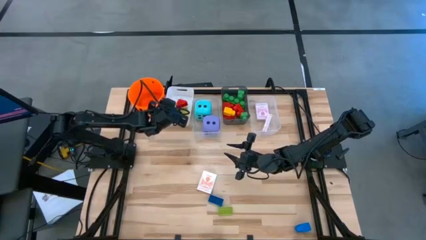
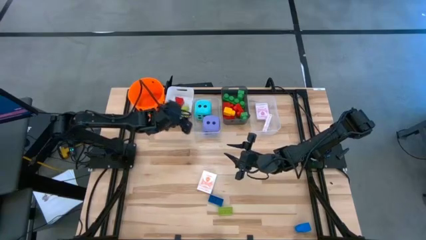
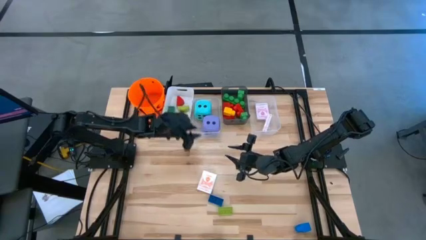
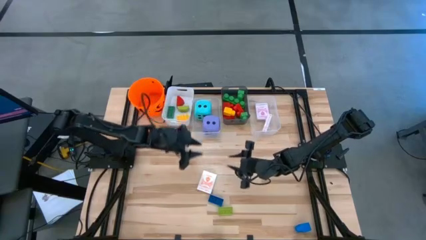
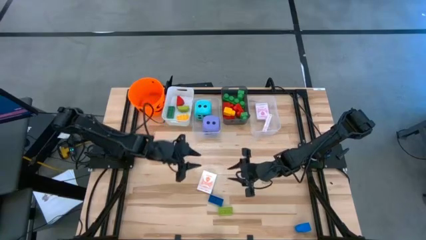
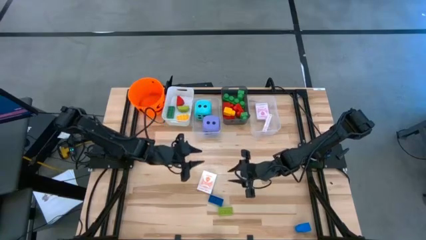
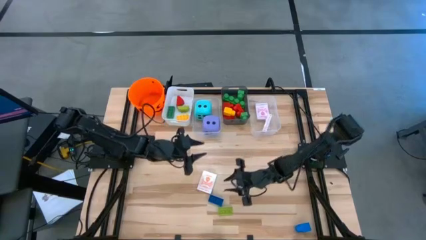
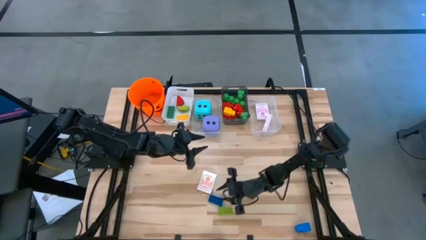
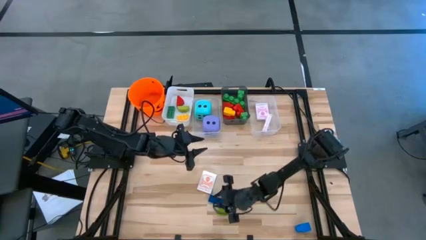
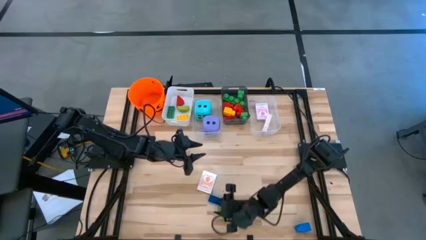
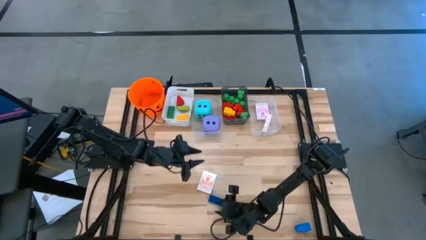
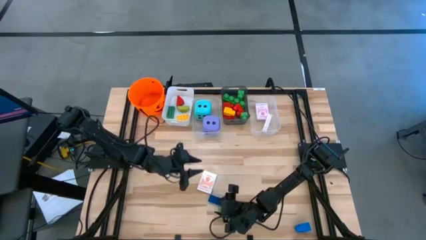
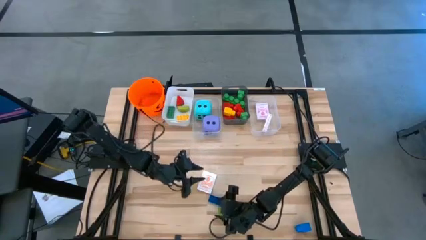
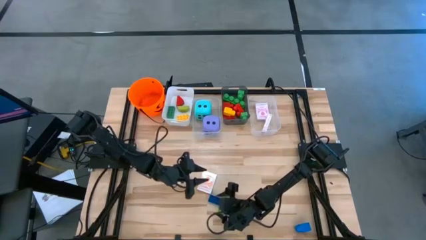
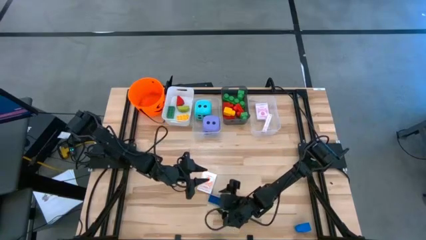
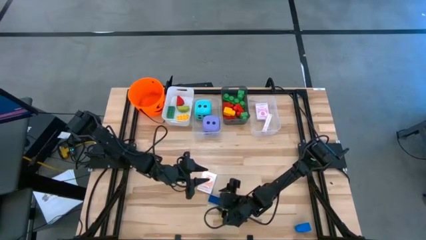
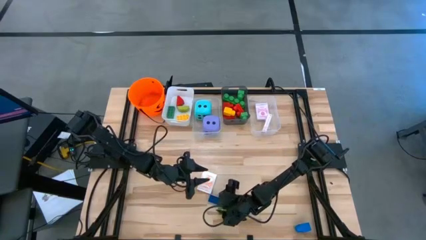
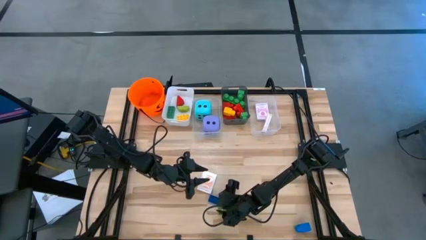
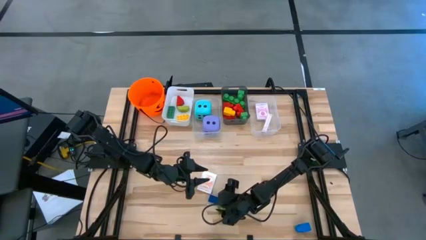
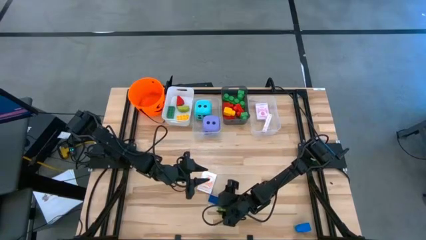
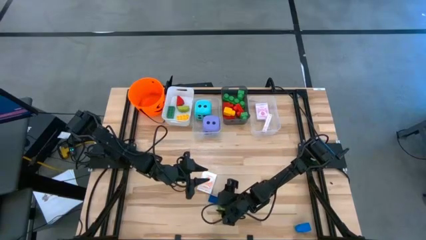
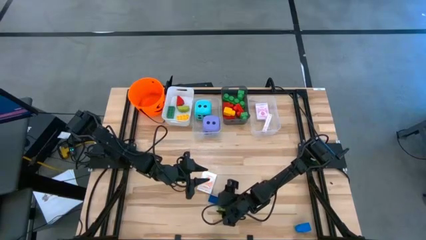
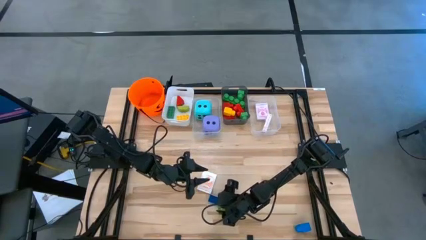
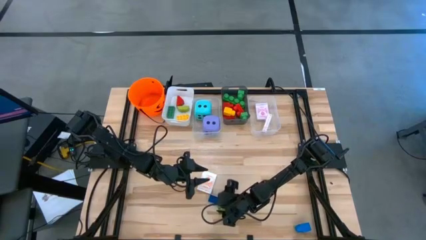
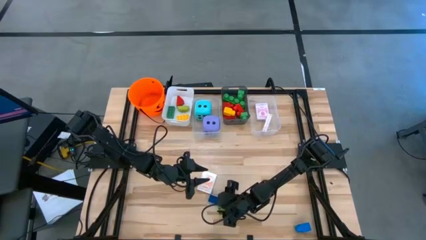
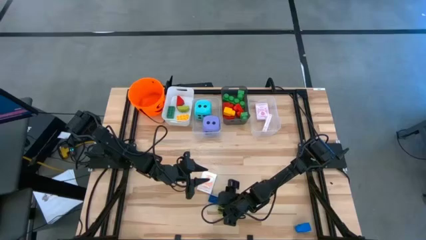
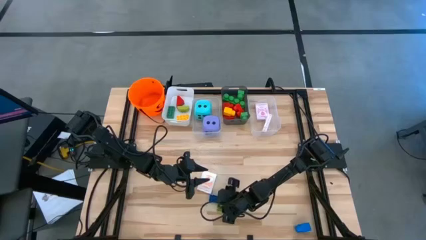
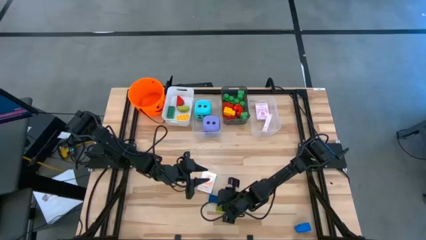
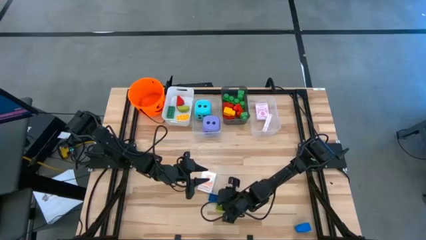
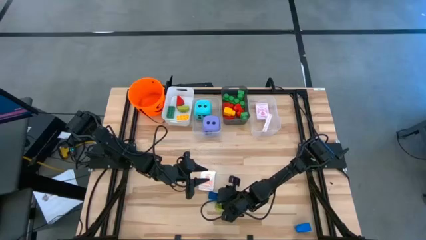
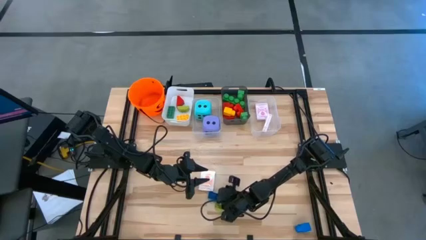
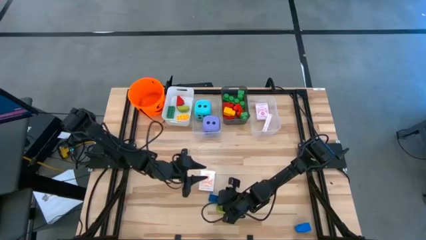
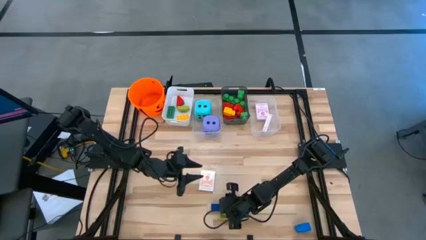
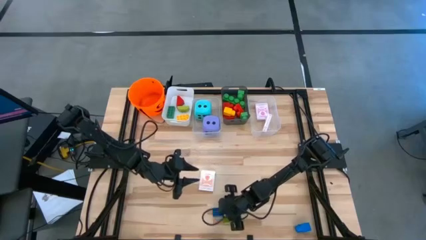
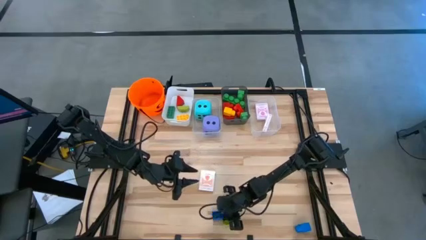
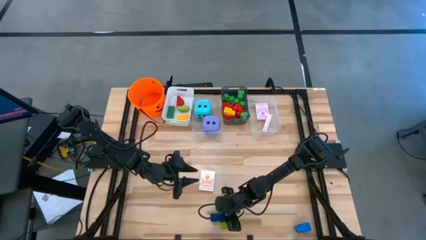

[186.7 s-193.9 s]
Task: Pick & Place Toys
Put the small blue game piece into the white bin

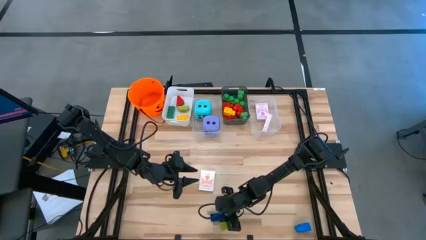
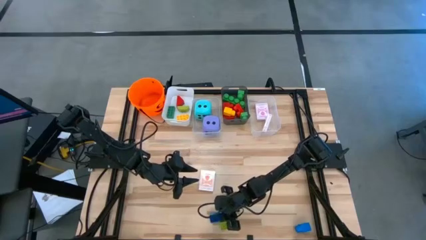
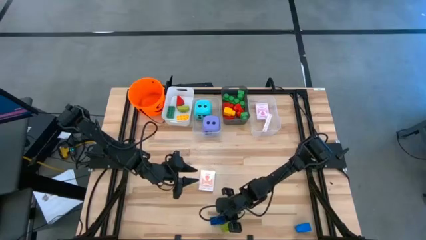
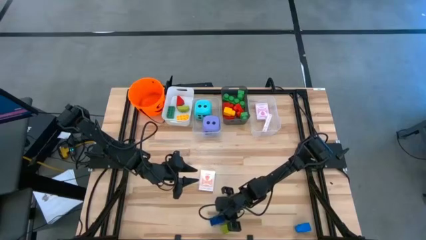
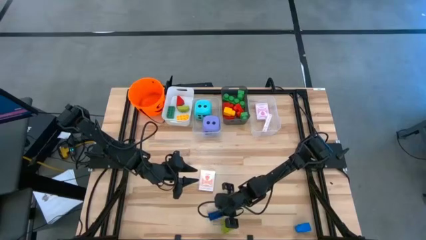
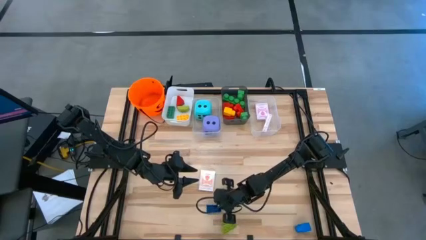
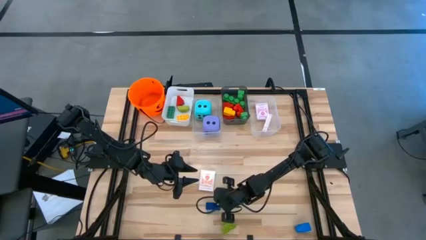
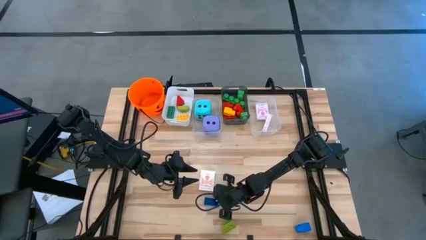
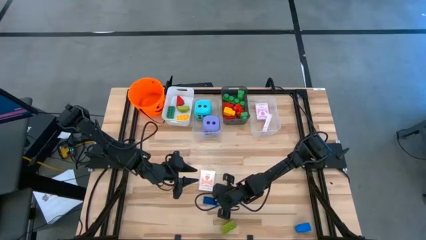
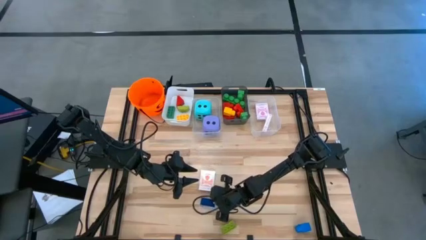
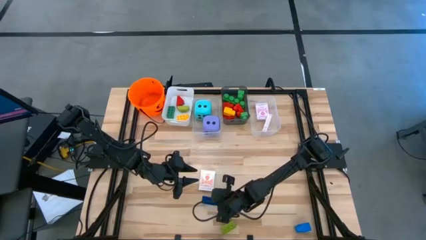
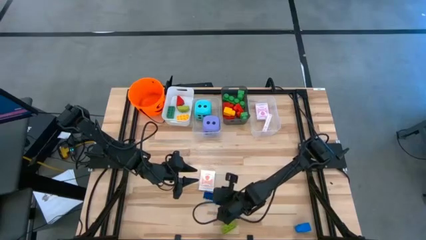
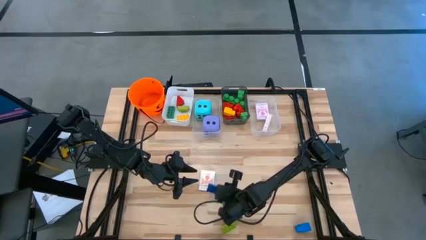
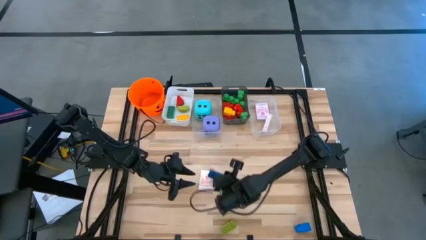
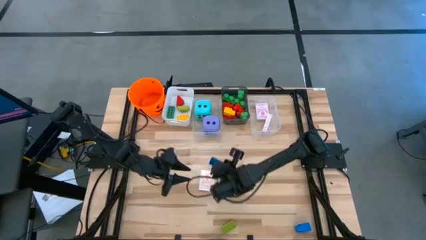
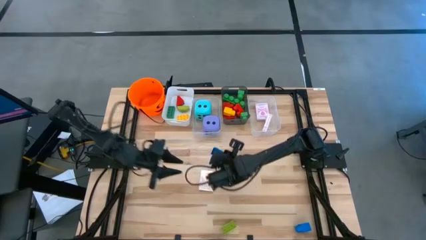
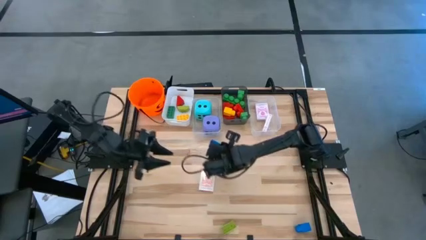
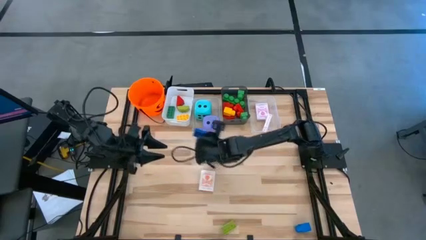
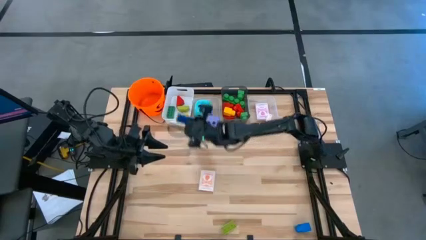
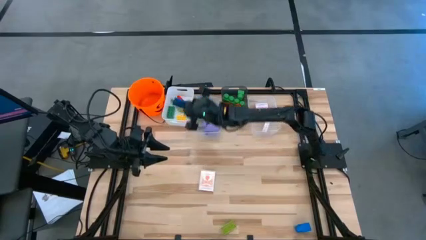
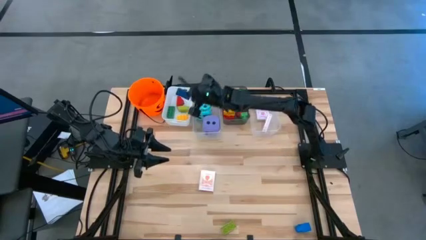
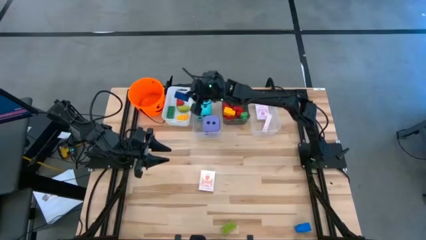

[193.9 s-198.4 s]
Put the small blue game piece into the white bin

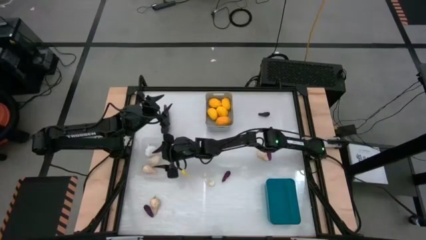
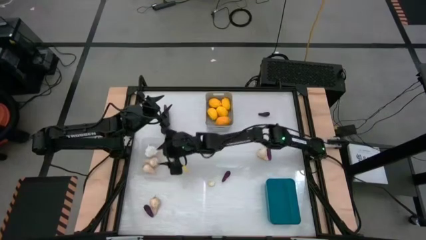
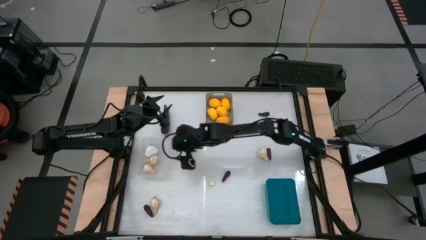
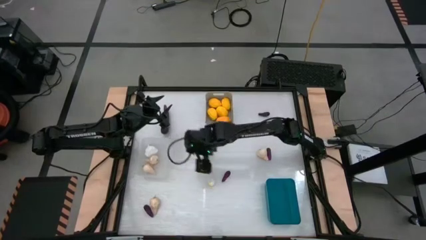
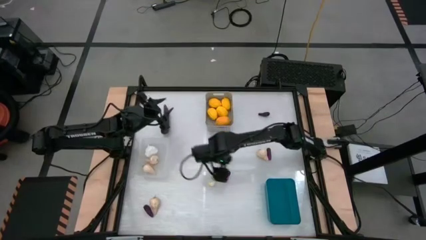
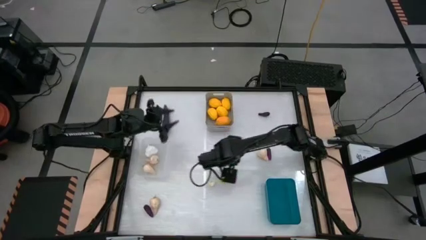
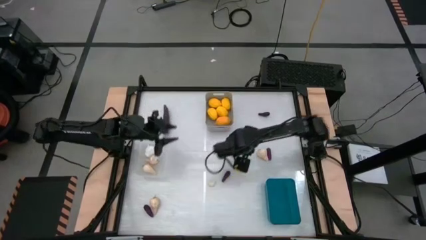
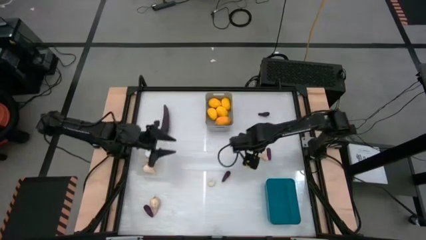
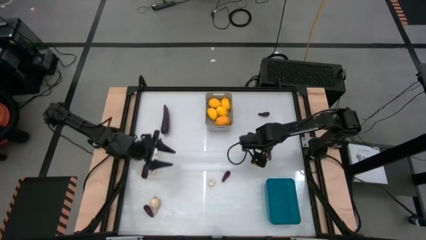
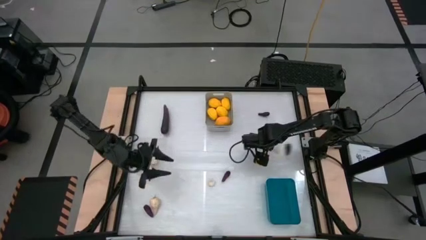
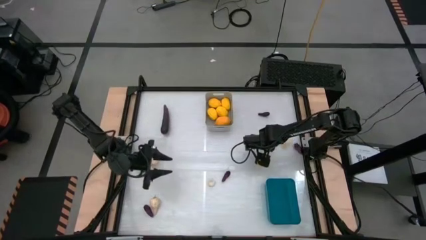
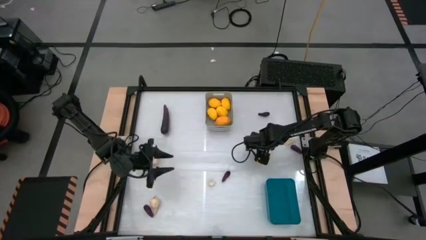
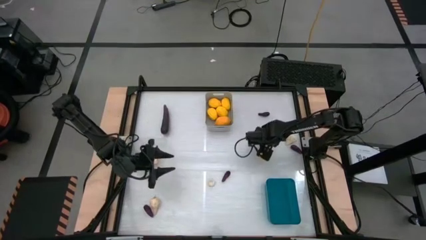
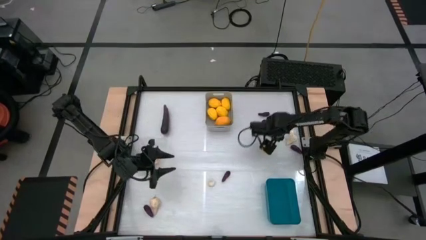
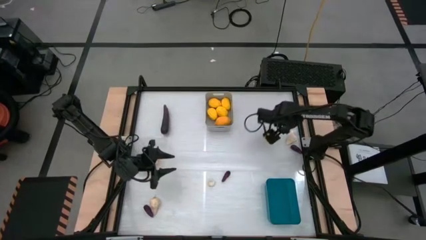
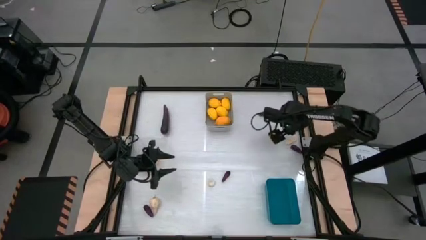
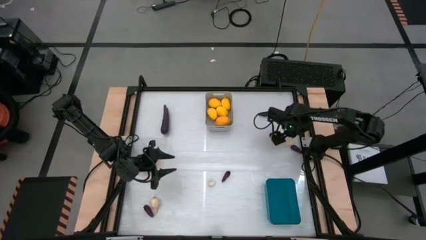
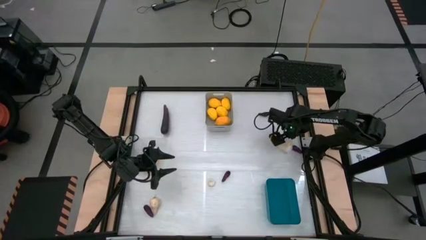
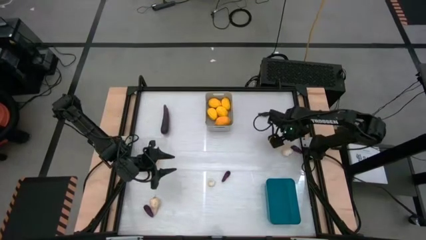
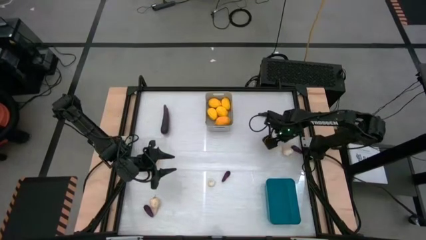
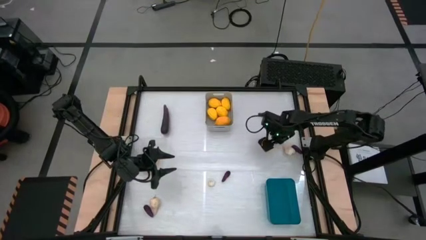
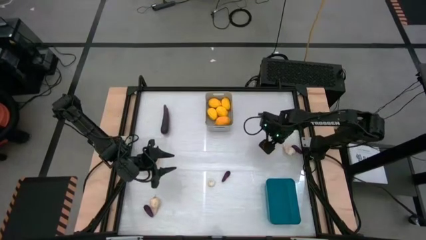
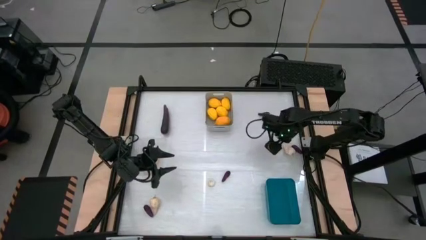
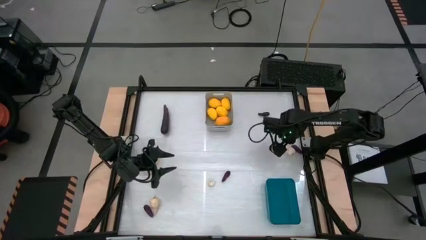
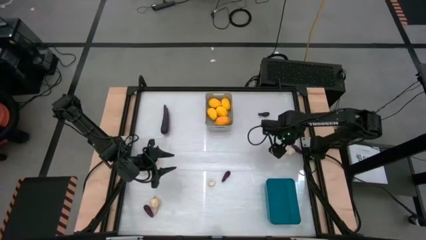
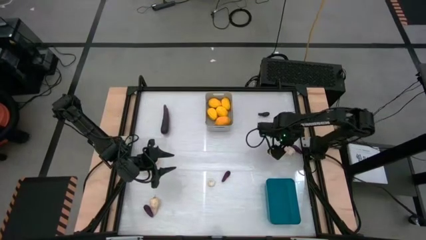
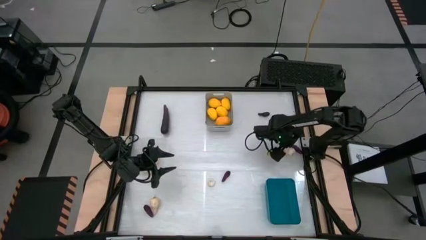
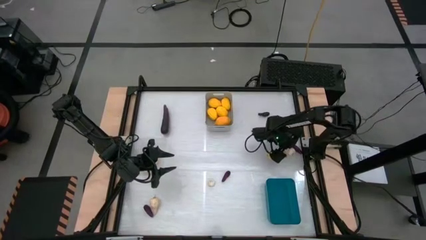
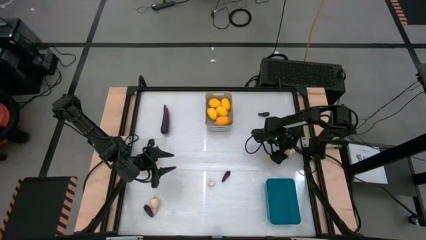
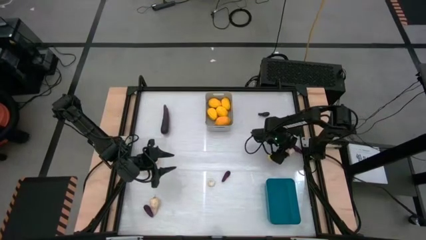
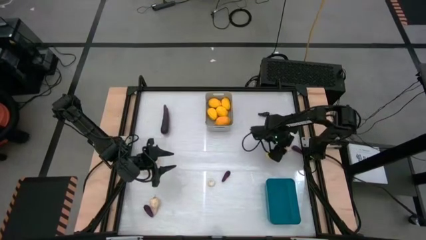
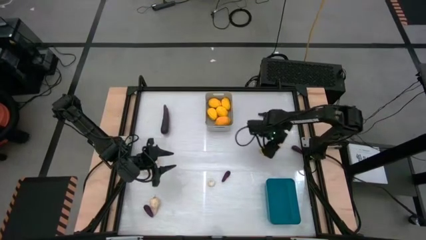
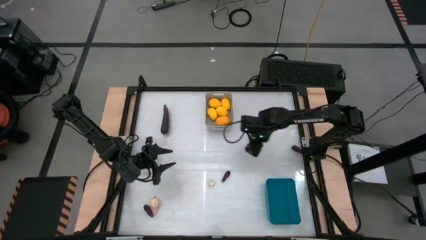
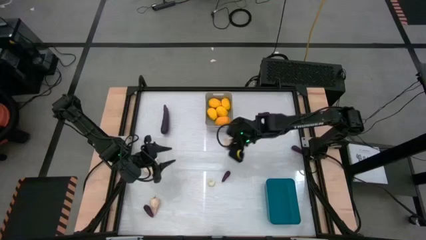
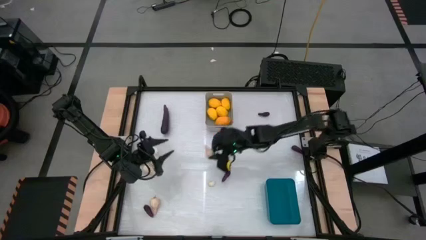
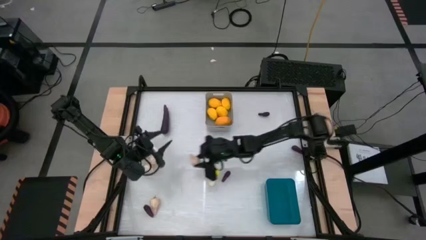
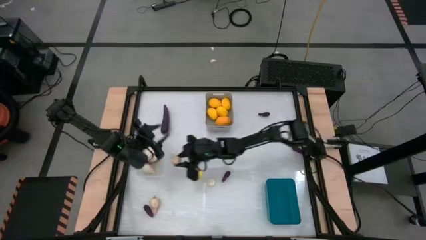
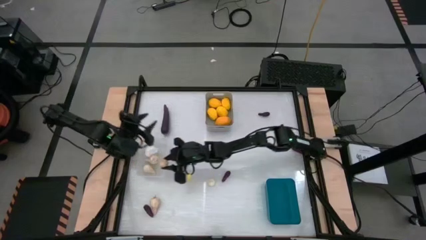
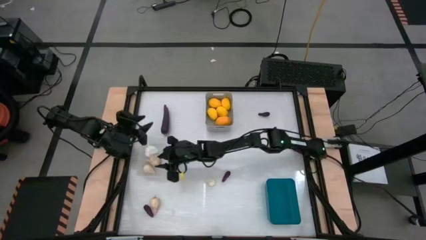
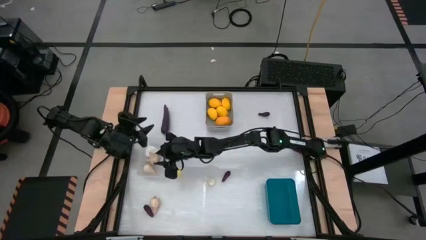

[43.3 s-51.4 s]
Task: Sort produce into baskets
Put the garlic into the transparent bin
